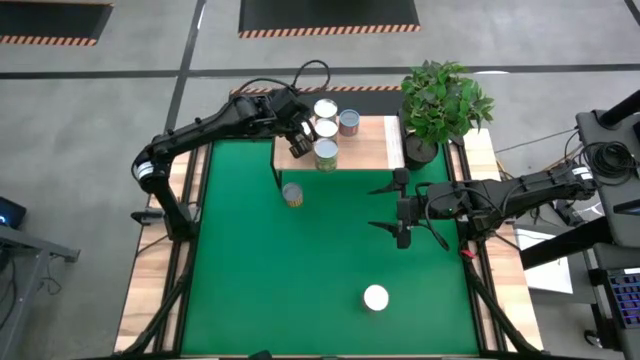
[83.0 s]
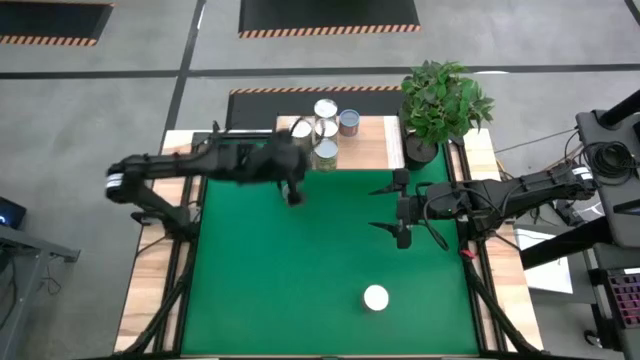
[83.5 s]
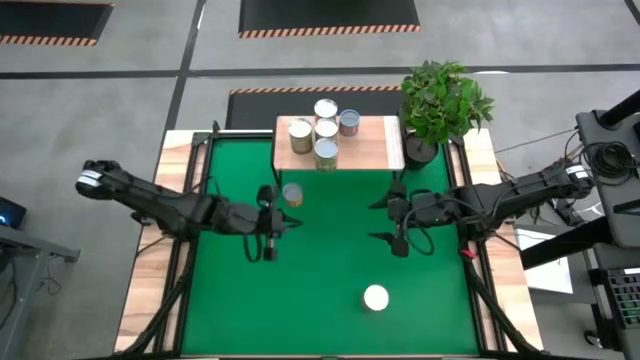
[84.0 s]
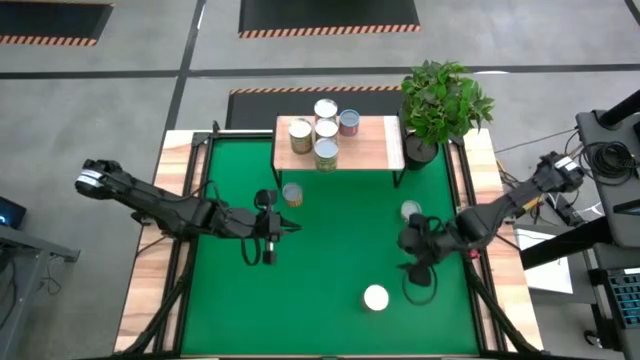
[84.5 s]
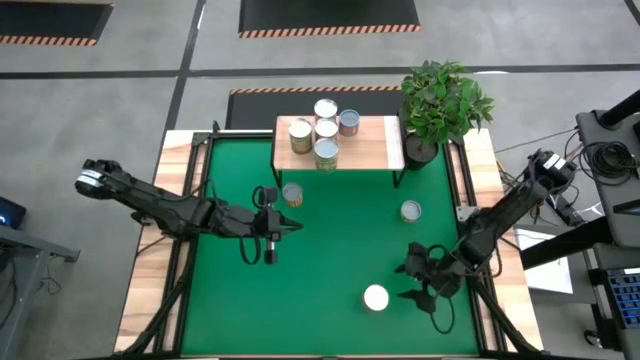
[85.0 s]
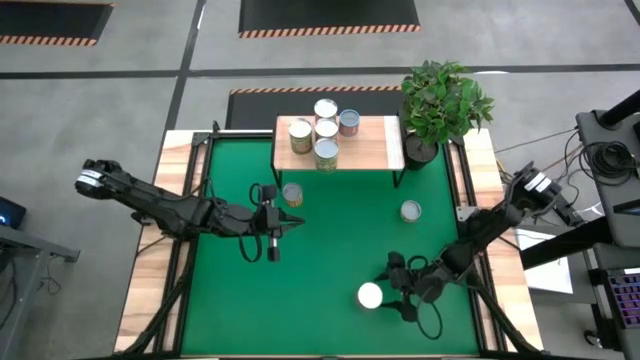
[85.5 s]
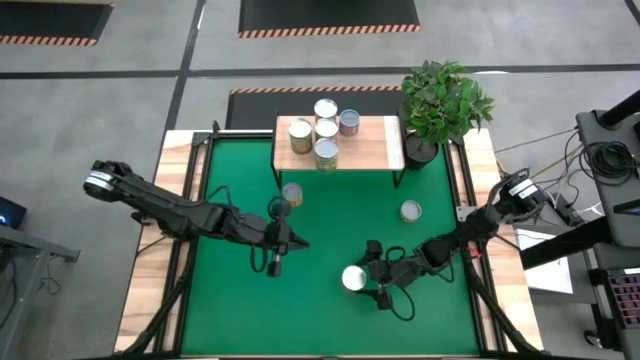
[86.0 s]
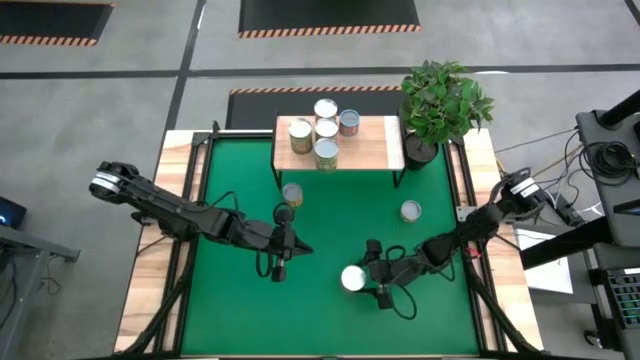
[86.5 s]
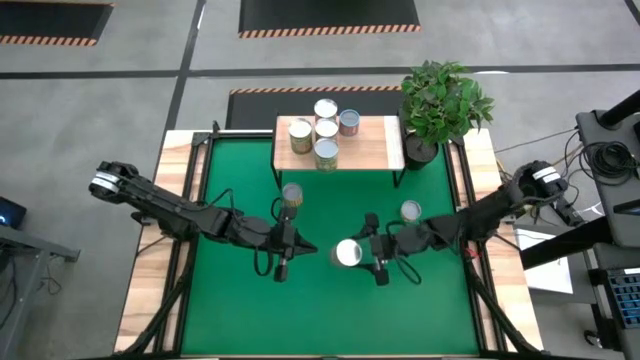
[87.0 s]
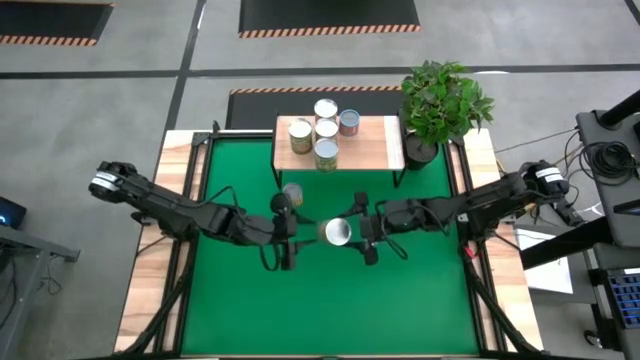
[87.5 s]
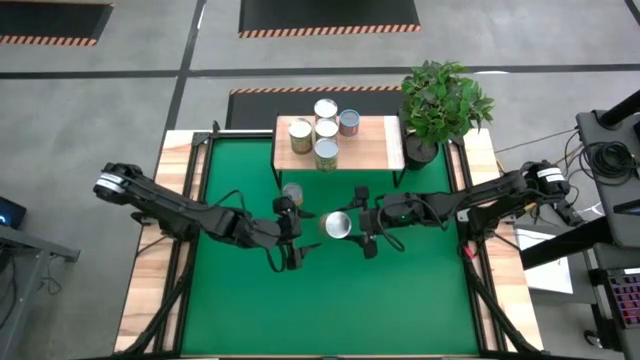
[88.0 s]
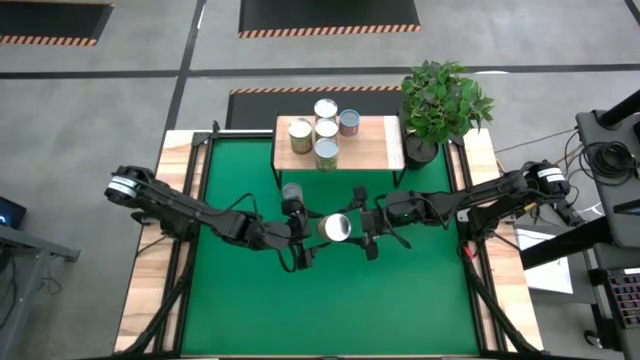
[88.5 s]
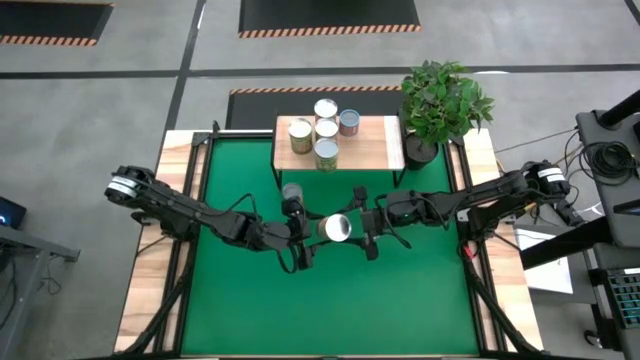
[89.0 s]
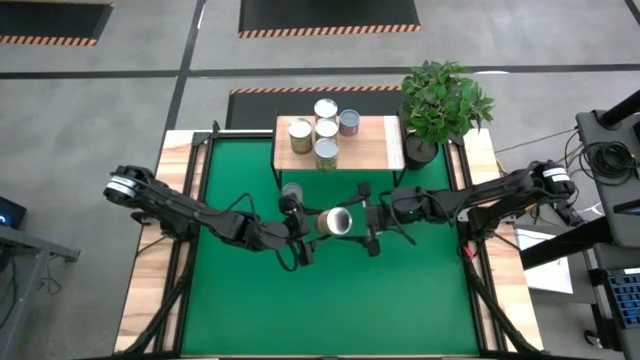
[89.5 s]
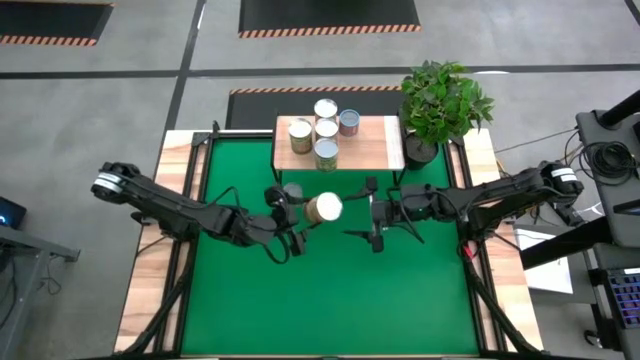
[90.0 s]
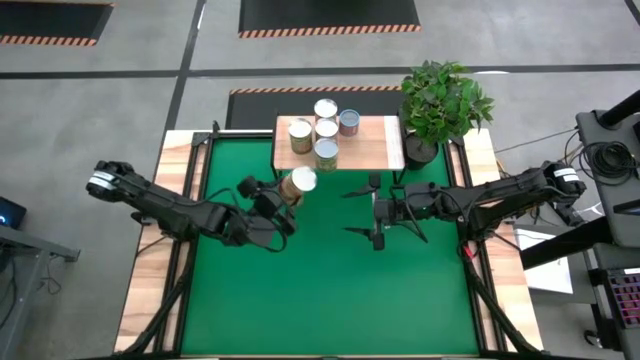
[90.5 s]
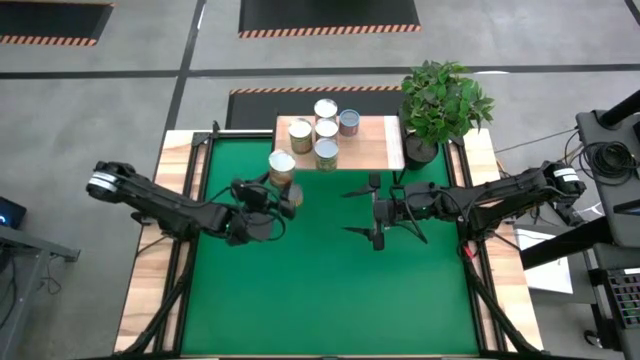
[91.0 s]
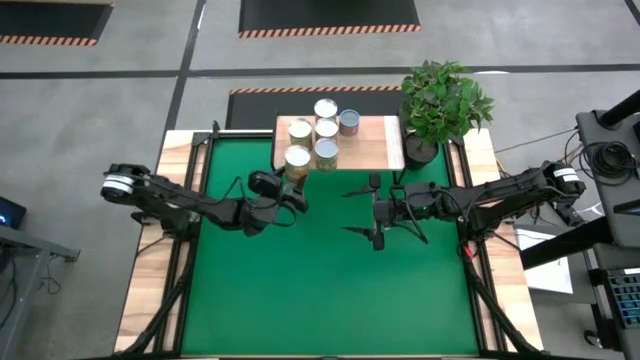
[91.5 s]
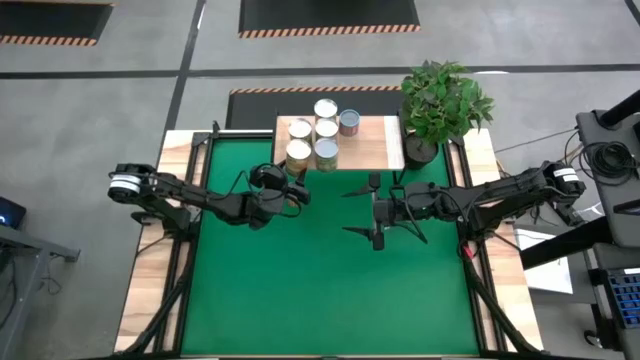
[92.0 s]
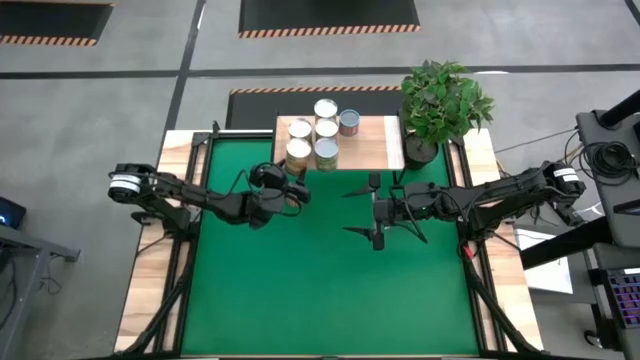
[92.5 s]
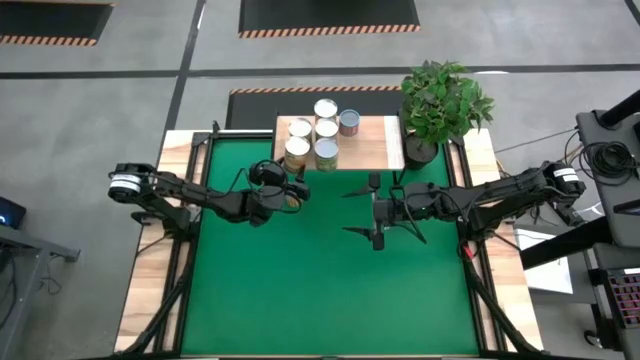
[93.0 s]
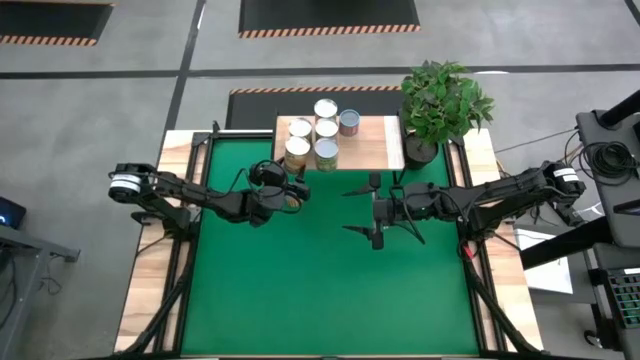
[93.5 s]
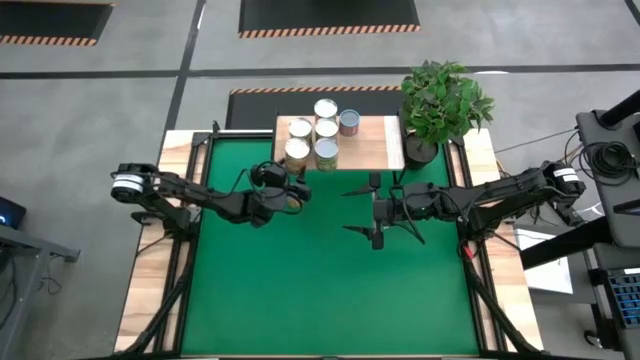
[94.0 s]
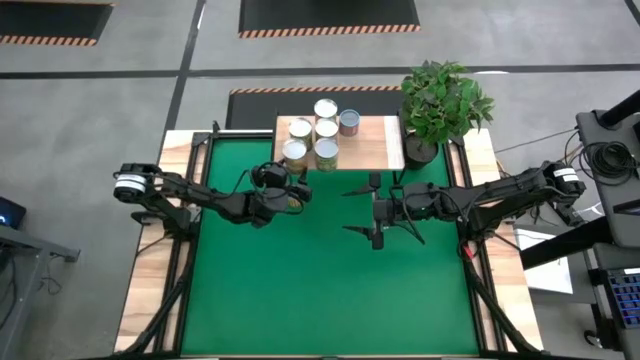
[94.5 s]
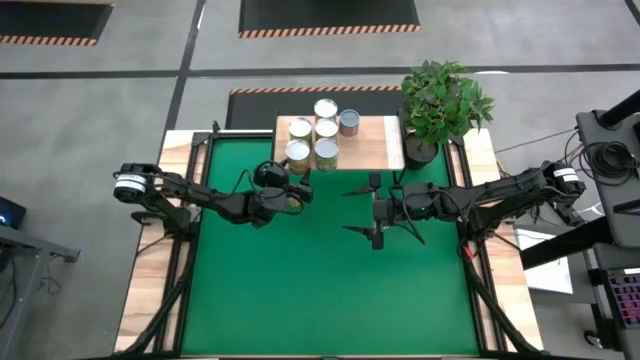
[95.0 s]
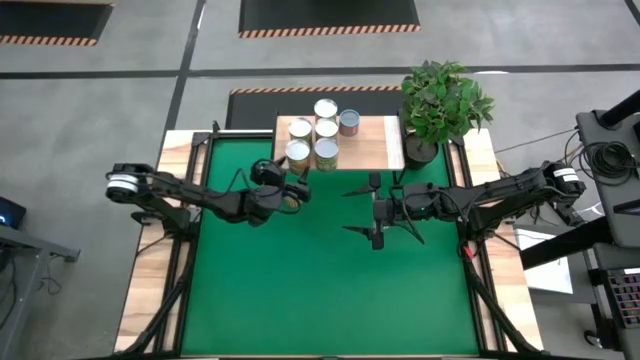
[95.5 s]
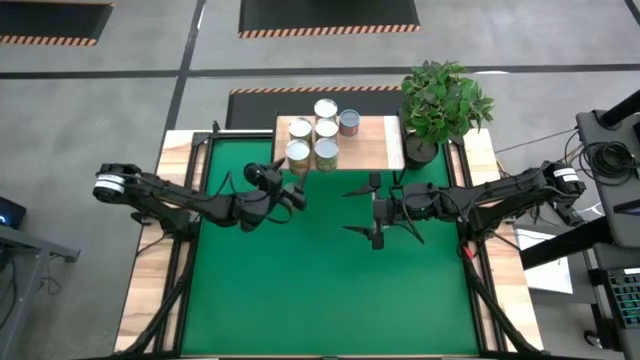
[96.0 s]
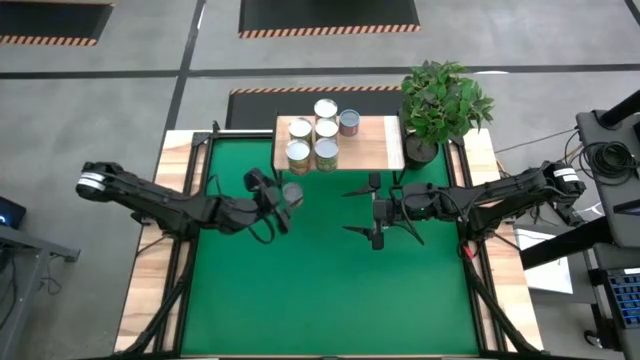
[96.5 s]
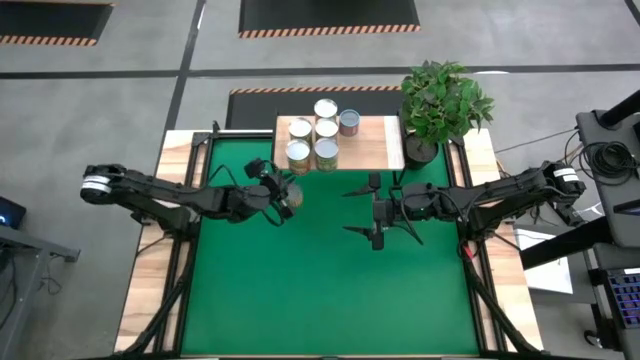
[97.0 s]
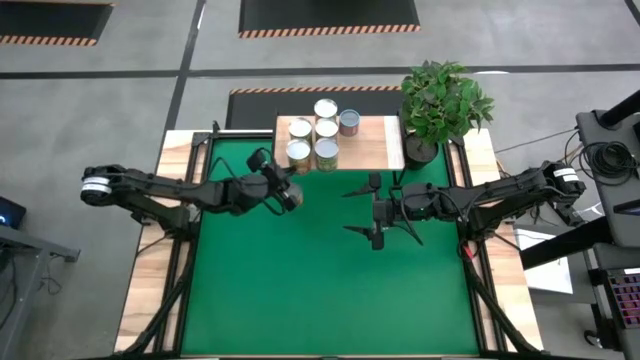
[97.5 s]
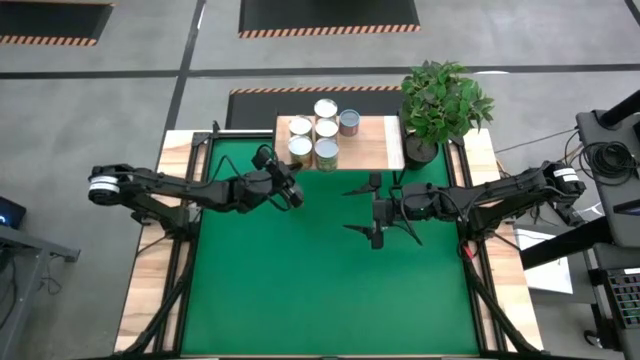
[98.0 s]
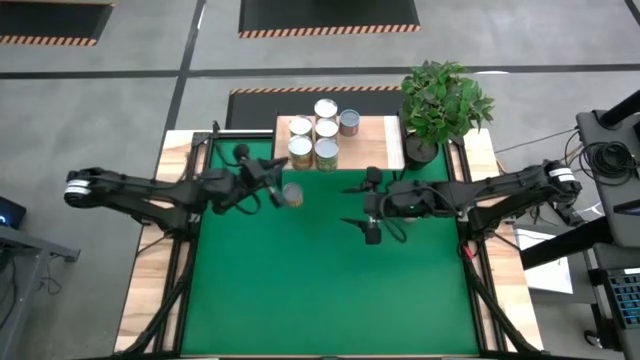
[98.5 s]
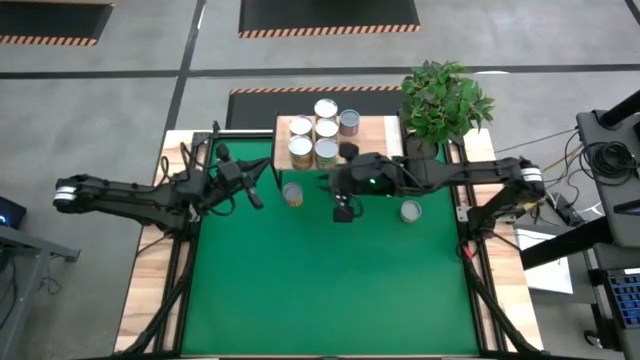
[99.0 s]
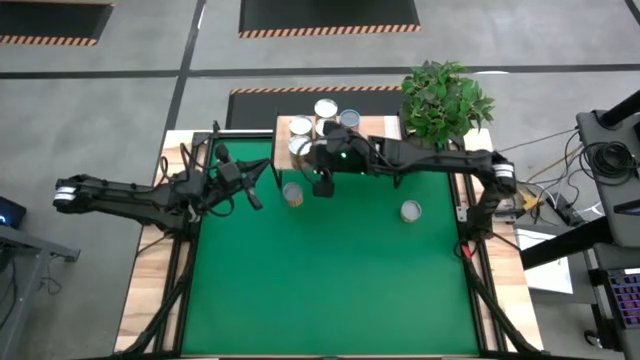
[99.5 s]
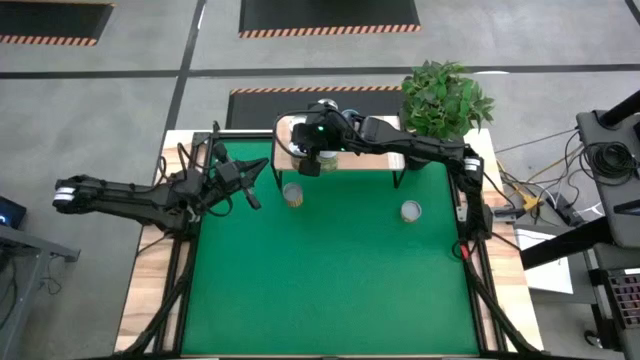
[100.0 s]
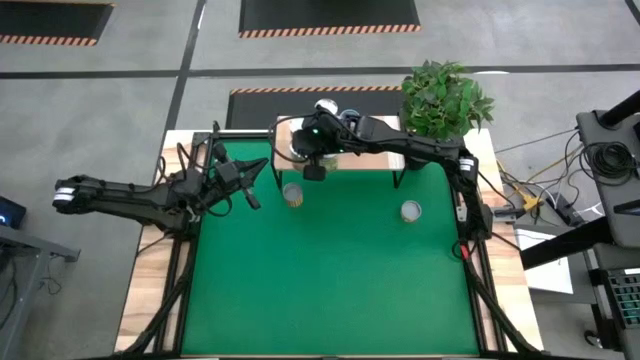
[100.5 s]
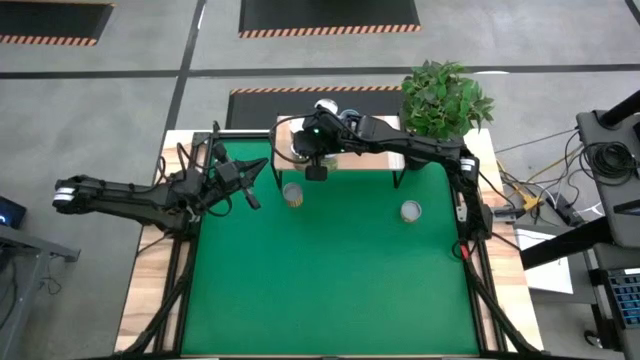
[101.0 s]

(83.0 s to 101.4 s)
Task: Pick and place cans onto a shelf
Put the canned corn on the shelf

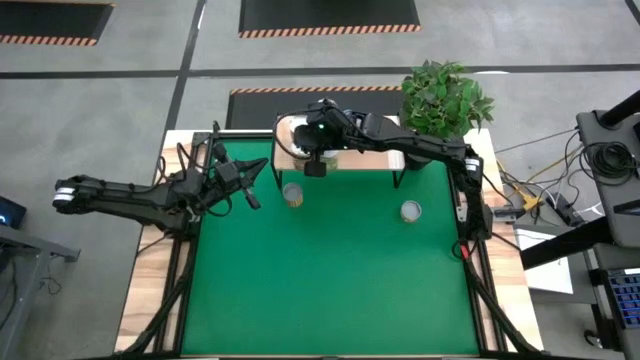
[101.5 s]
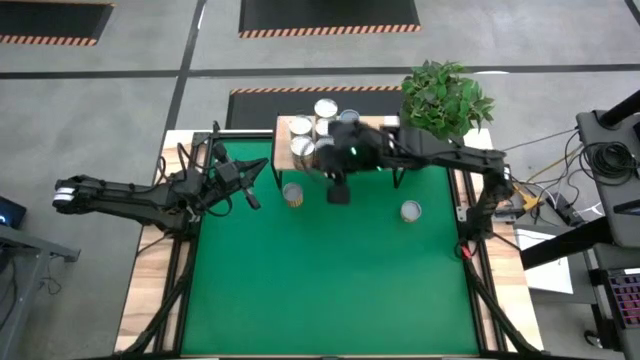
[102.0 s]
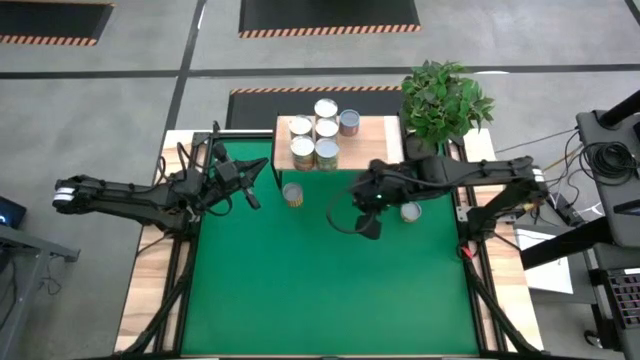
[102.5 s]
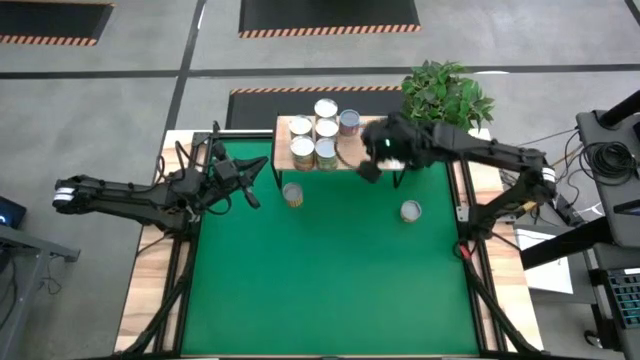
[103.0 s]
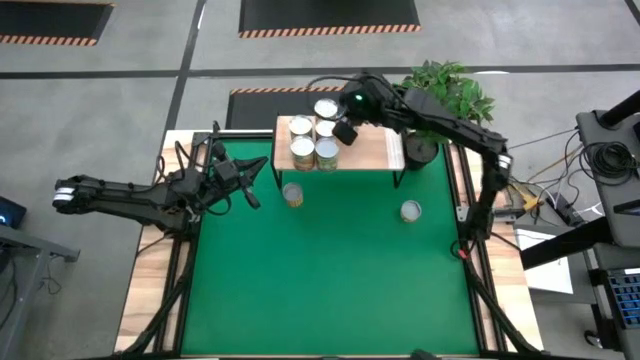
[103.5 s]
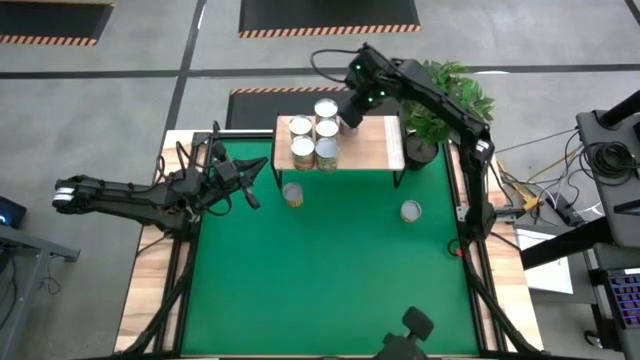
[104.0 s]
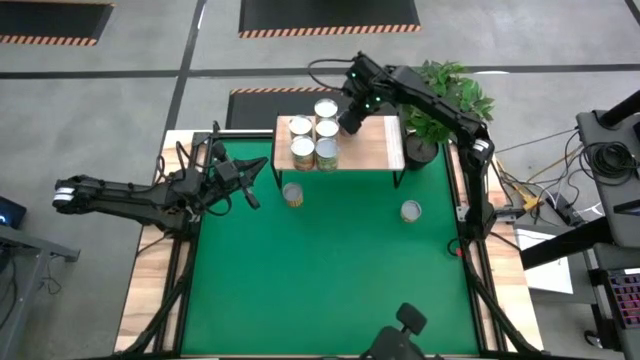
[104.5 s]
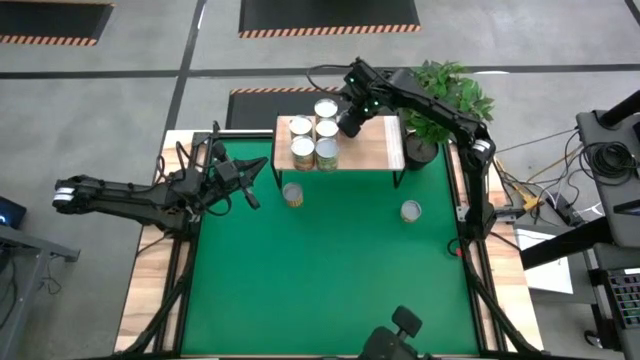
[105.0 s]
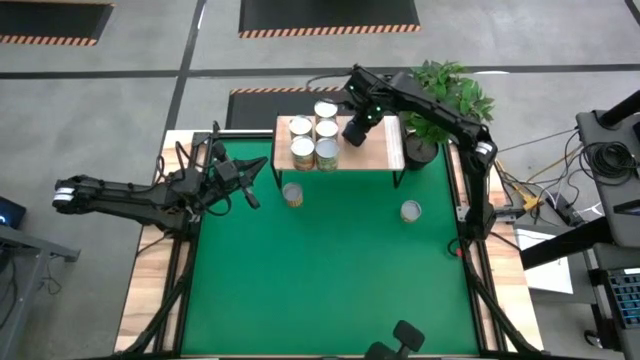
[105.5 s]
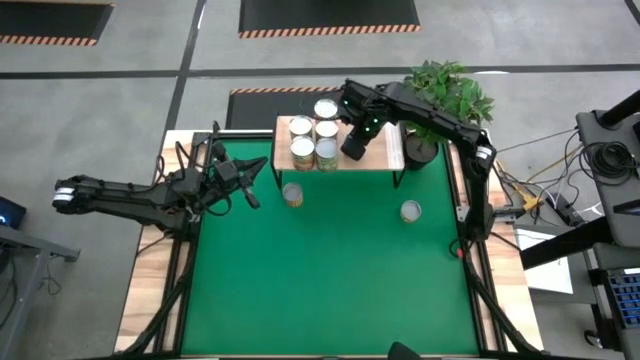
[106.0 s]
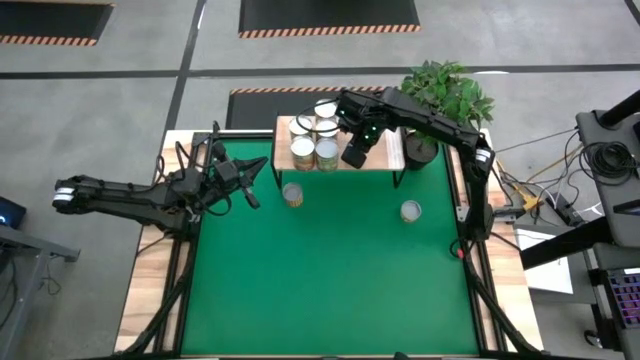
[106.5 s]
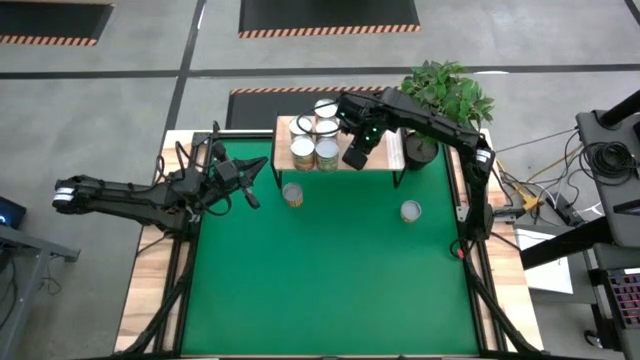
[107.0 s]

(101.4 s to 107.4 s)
Adjust the small canned corn on the shelf
